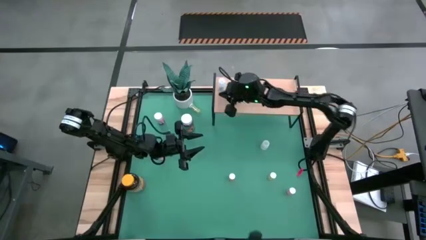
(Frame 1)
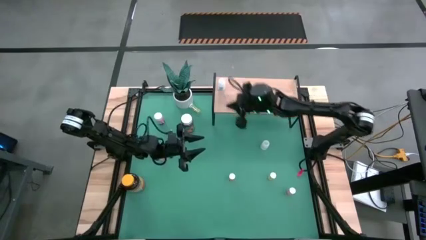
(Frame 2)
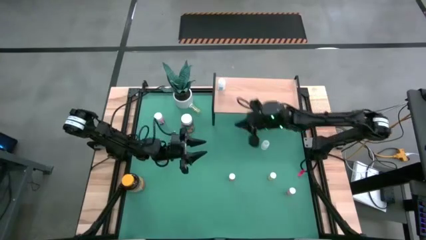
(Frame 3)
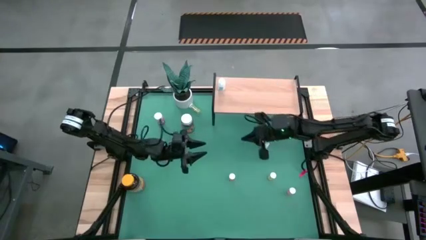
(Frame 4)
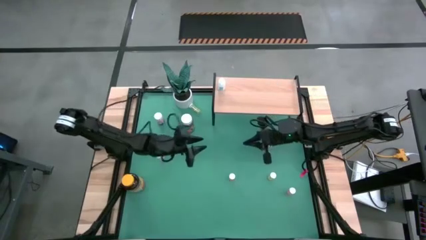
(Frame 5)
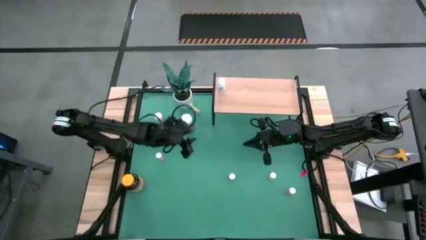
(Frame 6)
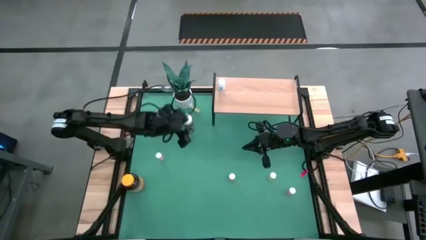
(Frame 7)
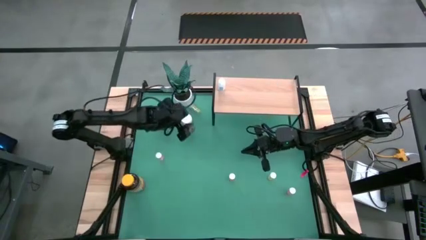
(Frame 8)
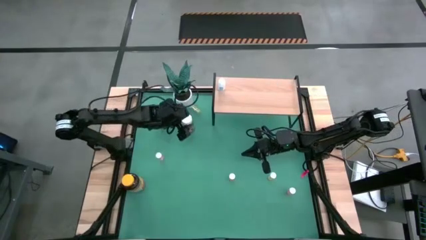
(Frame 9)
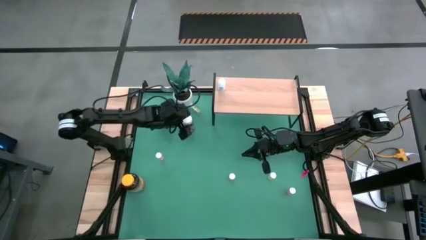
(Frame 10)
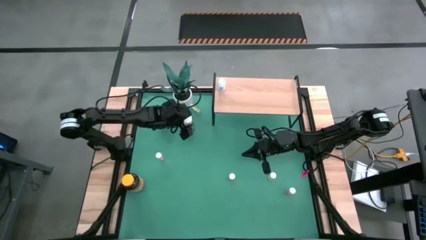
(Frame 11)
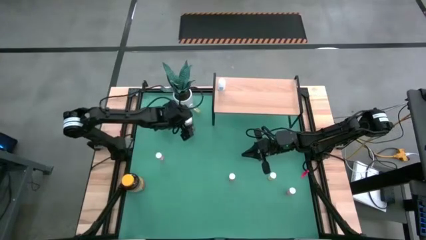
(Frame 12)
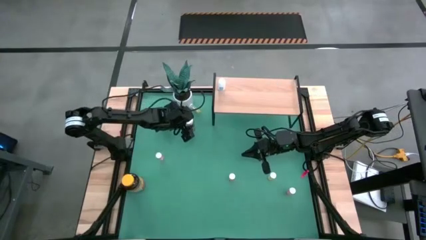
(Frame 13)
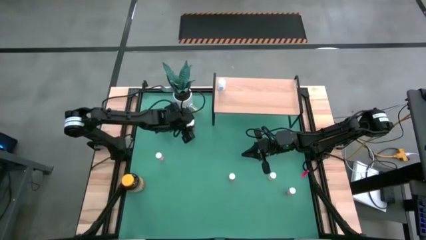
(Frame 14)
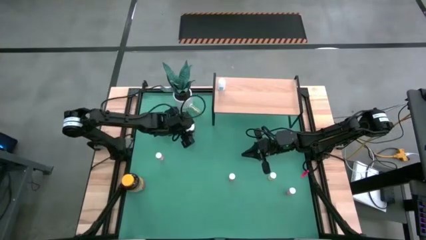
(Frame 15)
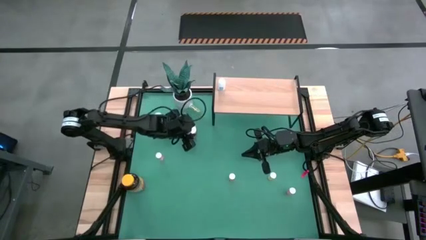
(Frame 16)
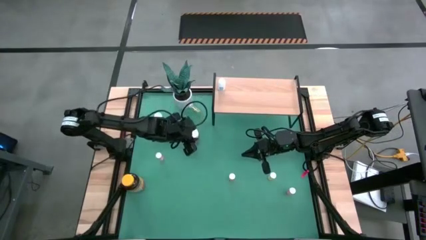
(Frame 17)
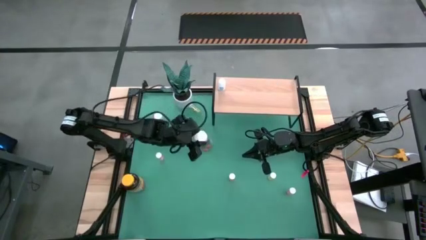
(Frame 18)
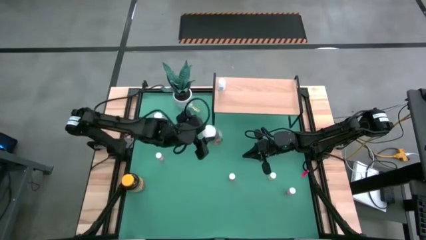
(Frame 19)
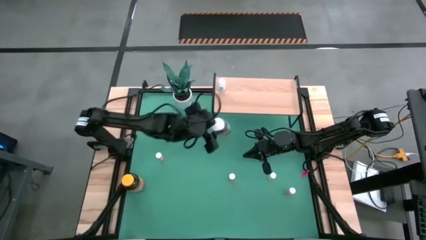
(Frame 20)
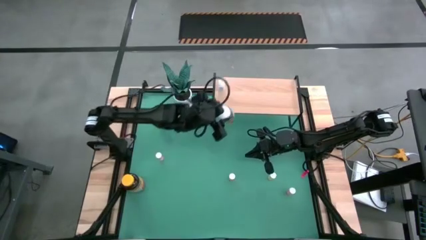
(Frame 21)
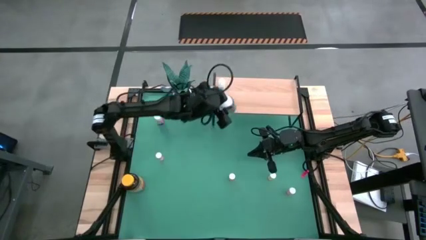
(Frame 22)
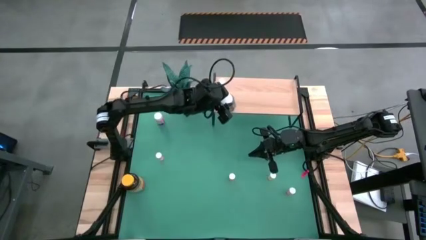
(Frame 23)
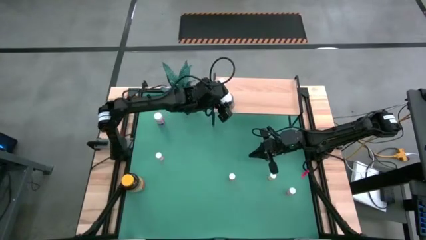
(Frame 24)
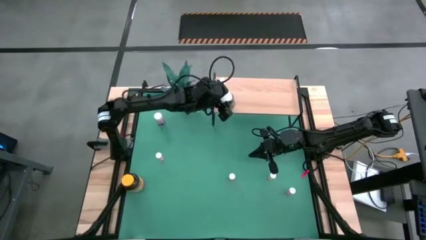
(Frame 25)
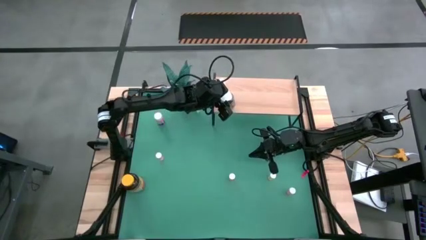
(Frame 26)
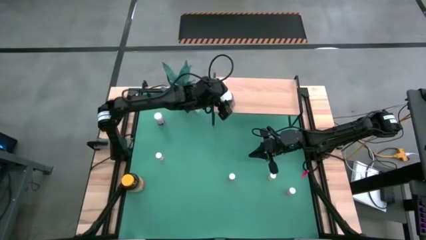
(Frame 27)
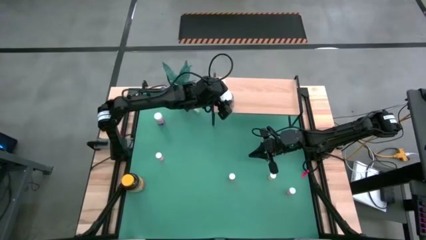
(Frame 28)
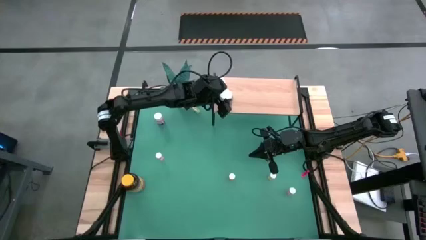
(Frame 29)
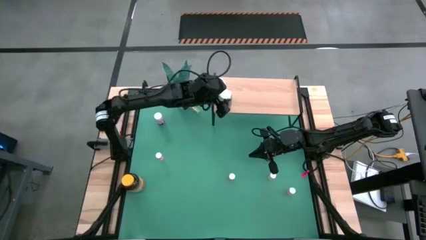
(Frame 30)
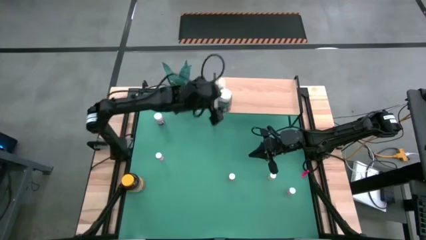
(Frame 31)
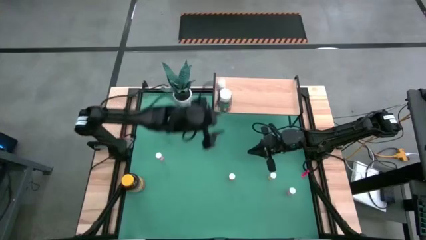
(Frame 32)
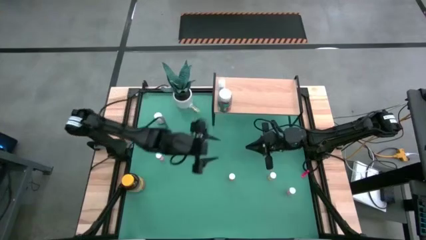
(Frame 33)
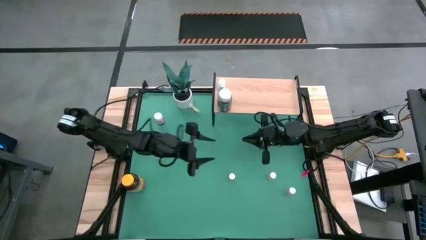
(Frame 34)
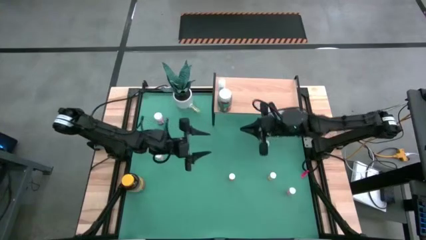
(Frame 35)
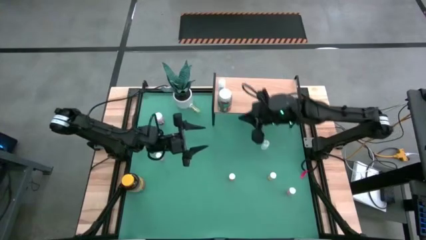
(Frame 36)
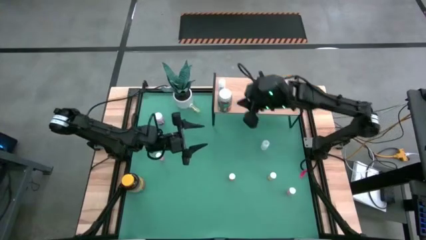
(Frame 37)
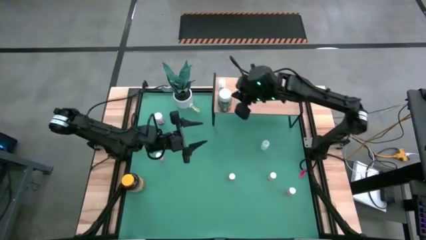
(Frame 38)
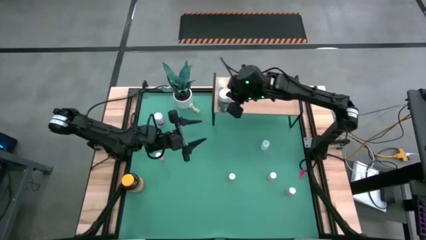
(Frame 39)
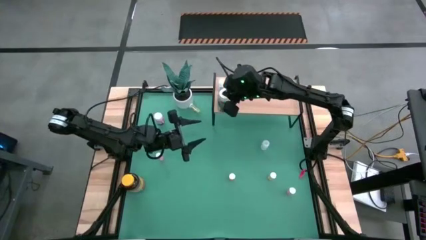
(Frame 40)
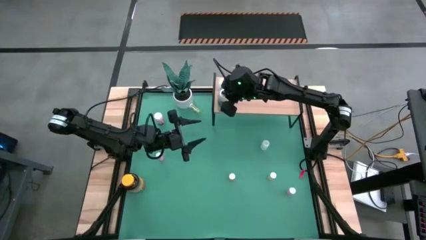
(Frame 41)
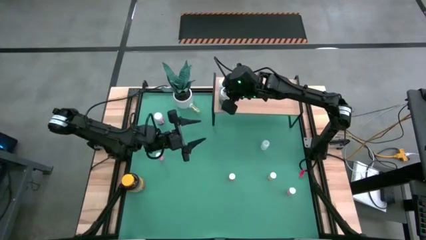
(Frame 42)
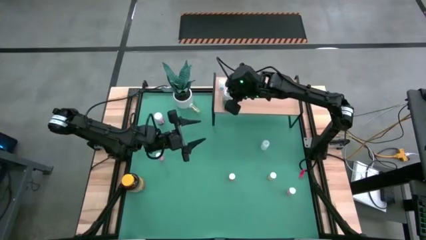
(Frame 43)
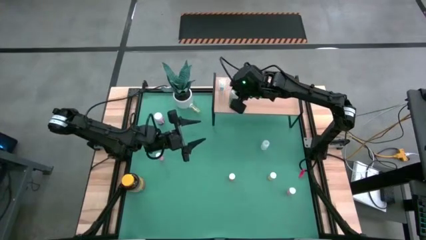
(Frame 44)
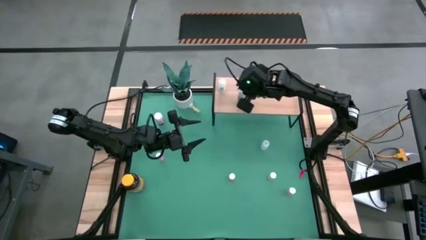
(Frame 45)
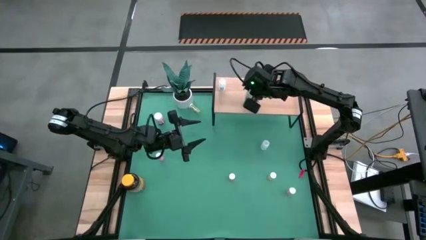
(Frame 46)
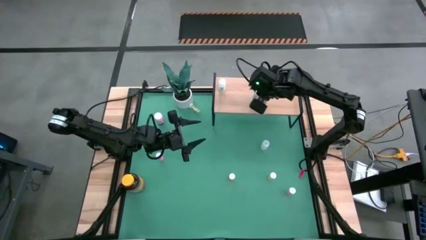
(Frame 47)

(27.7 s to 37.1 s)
Task: Pick and place medicine bottles onto shelf by color
Put the green pill bottle on the shelf

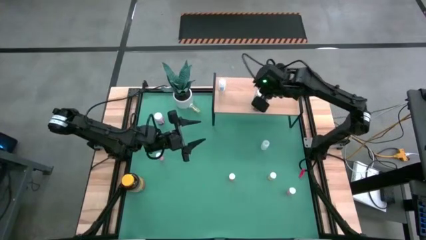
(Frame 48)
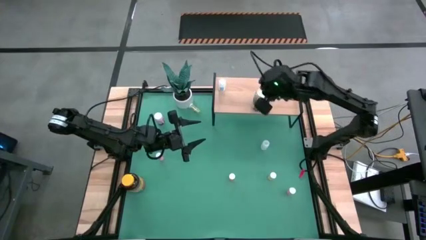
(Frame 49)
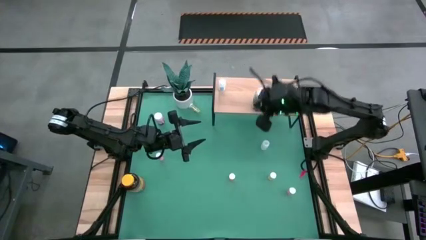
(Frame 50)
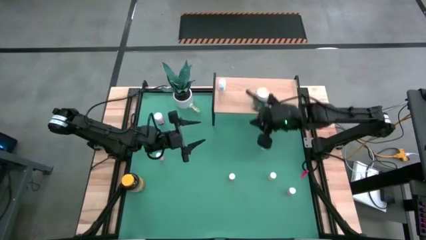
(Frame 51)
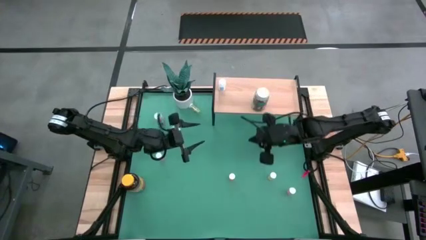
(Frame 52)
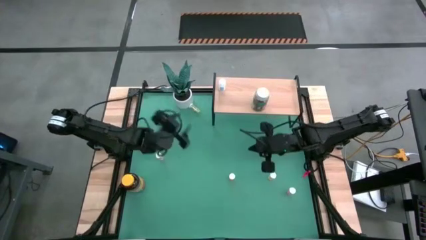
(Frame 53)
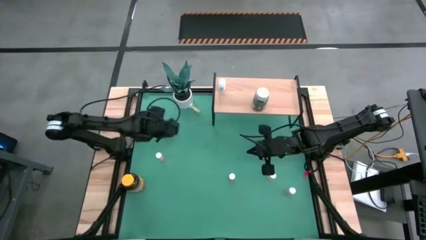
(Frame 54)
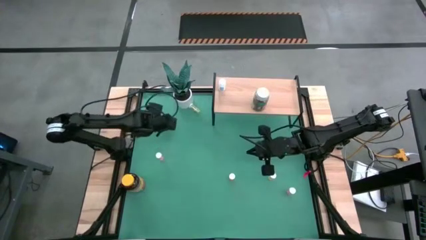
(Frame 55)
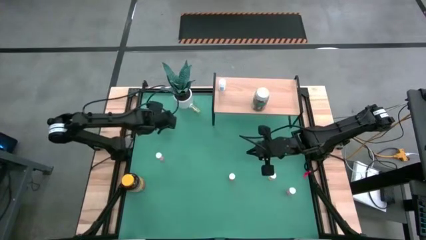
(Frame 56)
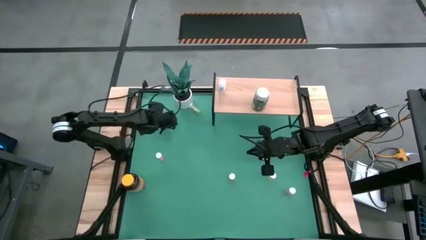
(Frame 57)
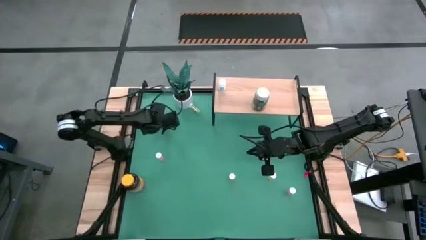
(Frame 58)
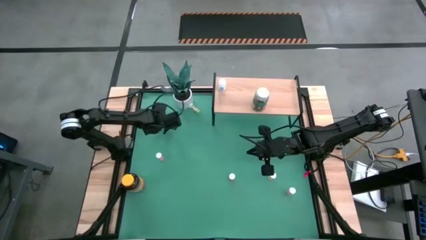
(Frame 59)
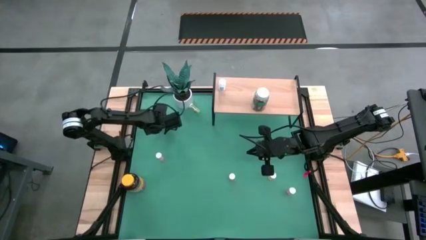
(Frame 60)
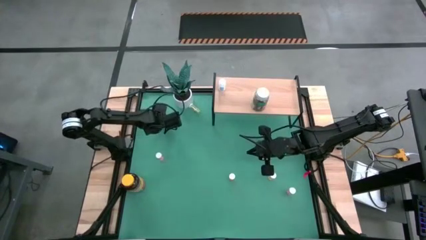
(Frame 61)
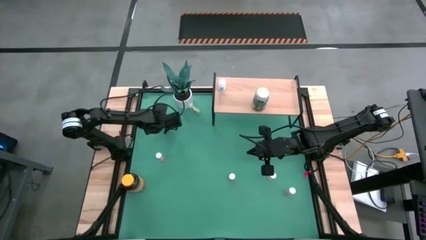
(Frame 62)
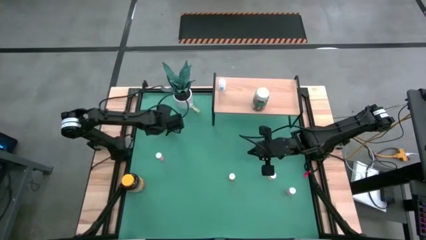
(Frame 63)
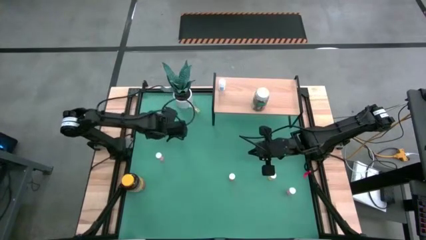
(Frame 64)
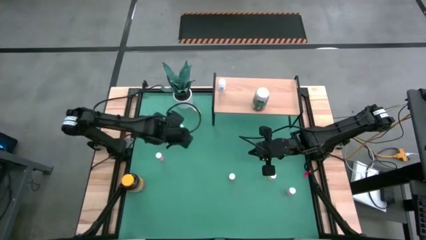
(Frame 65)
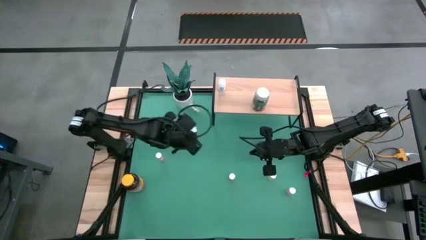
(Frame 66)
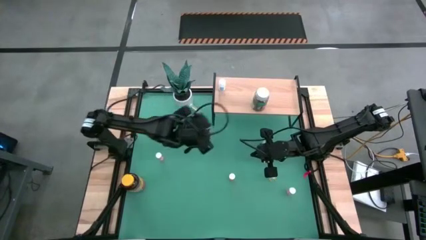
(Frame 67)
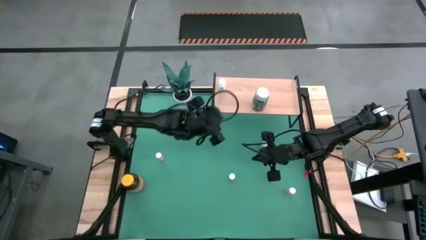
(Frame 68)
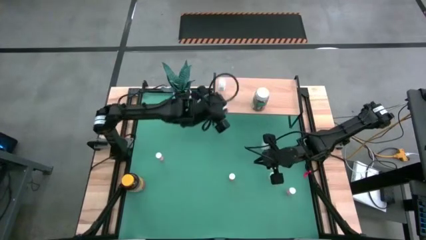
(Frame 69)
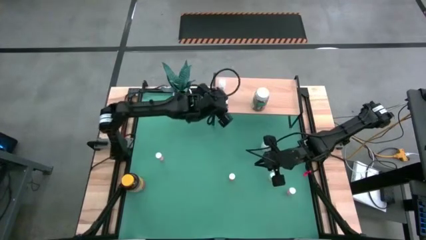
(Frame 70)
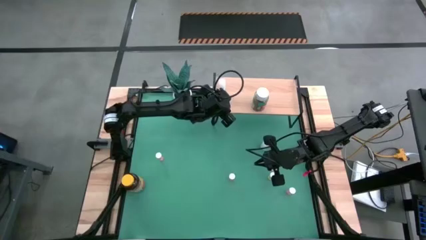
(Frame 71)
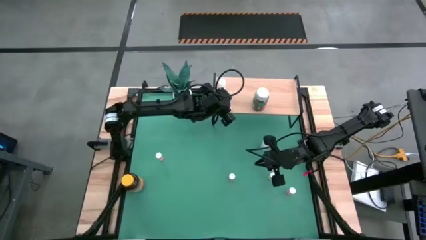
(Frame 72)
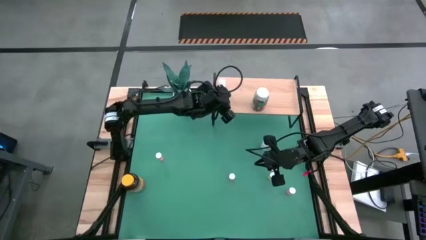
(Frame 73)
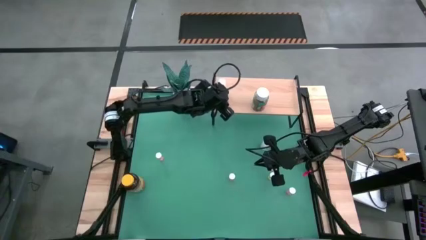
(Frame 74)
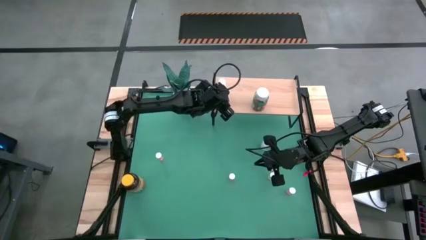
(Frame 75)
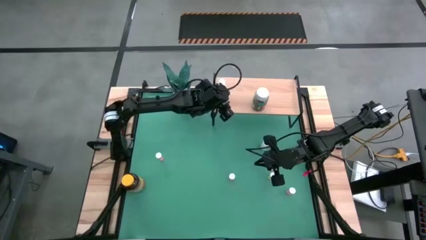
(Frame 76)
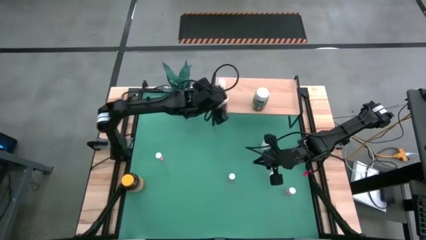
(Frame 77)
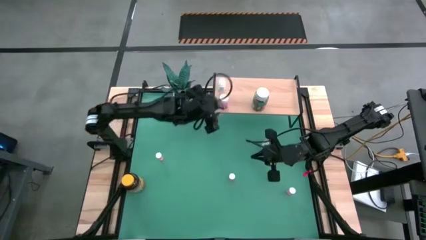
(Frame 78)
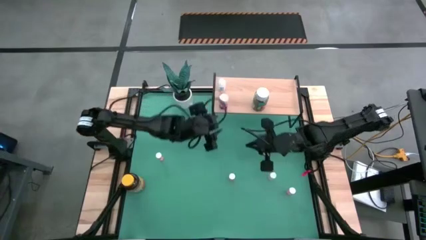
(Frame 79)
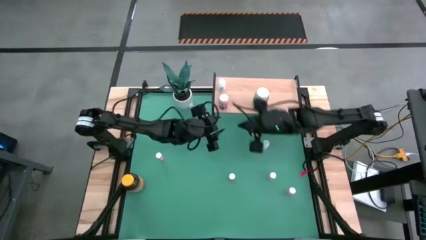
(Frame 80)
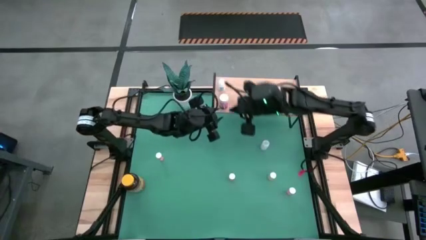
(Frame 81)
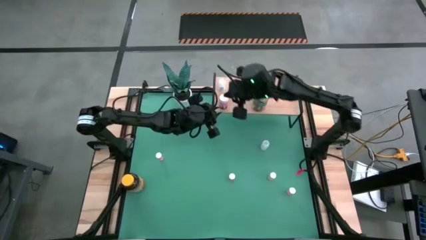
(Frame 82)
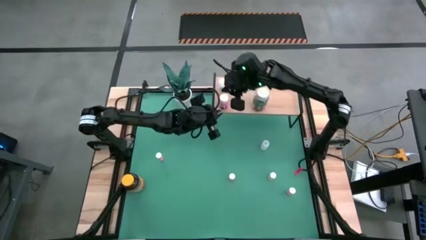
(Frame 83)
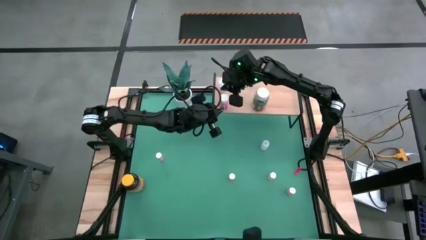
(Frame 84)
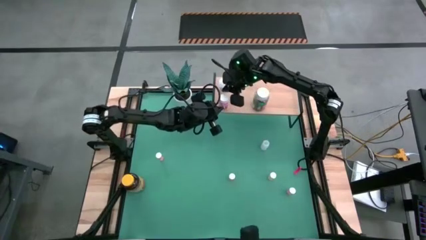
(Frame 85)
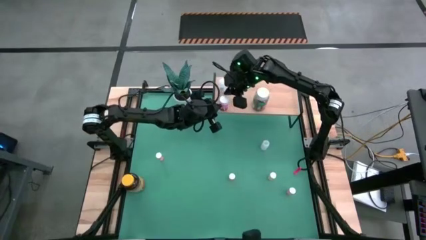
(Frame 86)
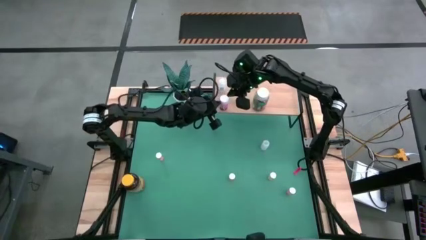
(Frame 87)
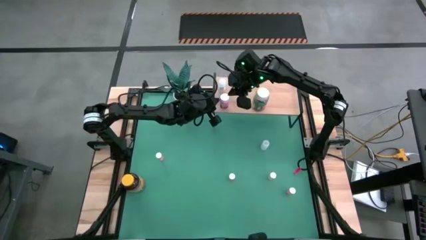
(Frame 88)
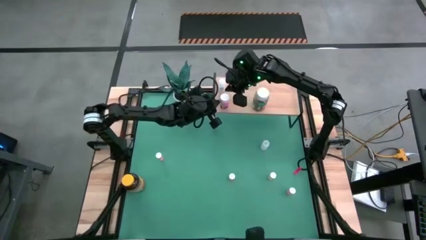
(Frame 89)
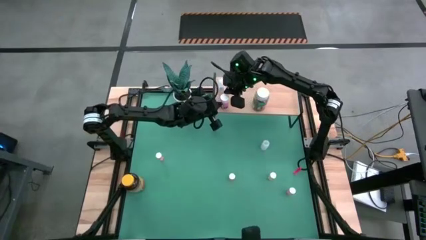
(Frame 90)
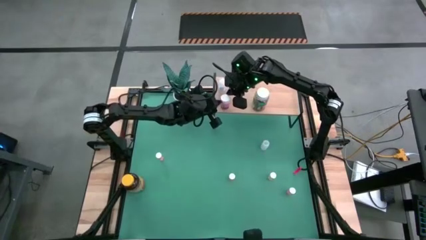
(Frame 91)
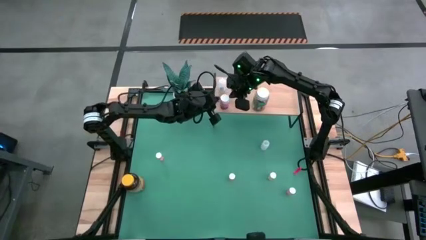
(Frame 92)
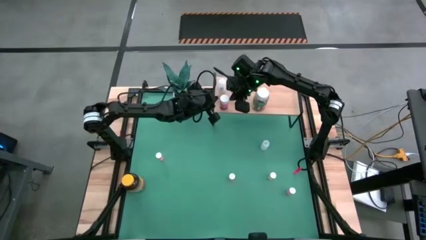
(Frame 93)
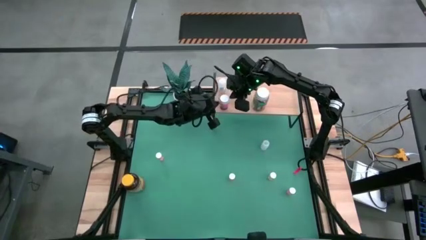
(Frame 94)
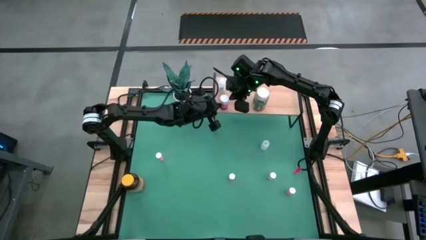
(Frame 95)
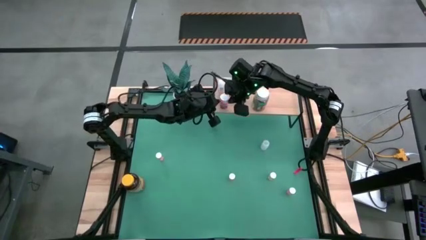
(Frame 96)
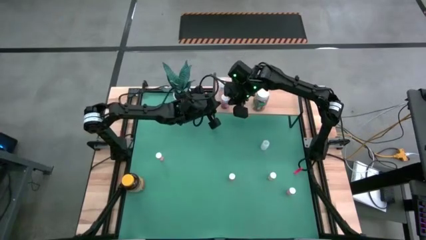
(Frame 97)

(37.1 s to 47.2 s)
Put the pink pill bottle on the shelf
